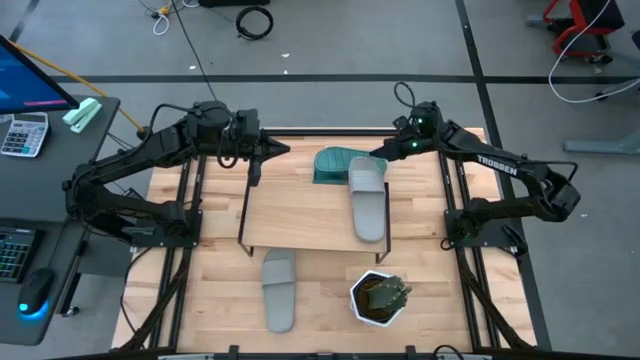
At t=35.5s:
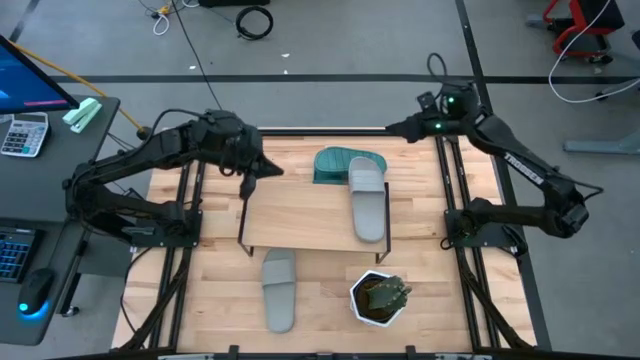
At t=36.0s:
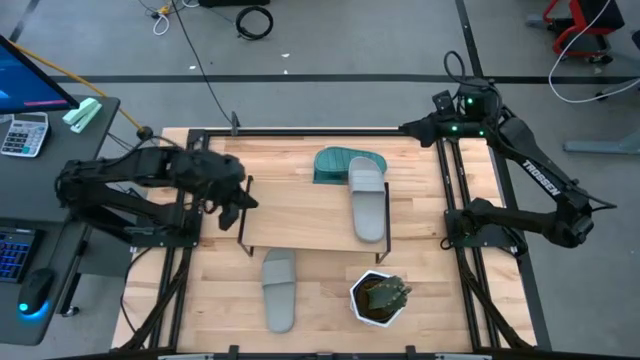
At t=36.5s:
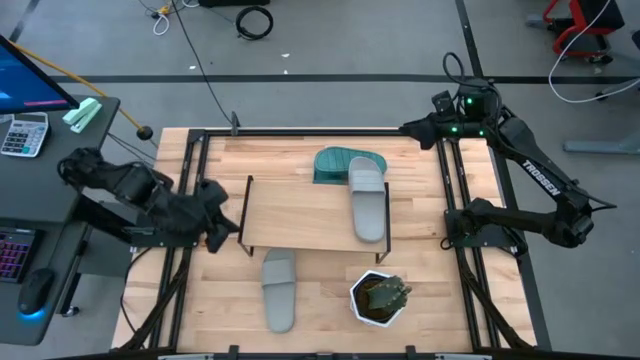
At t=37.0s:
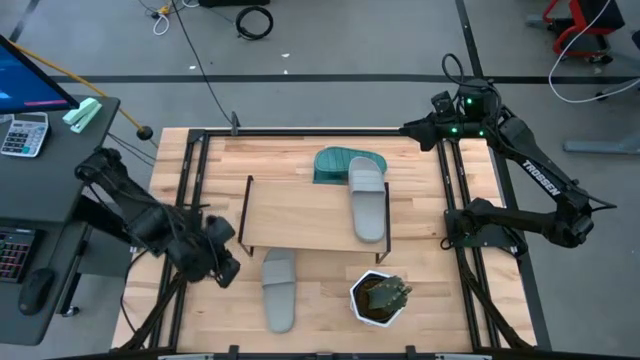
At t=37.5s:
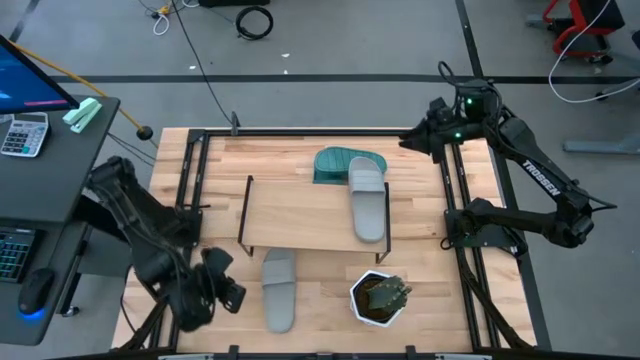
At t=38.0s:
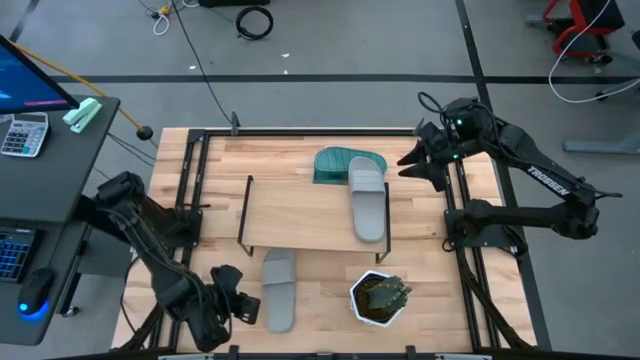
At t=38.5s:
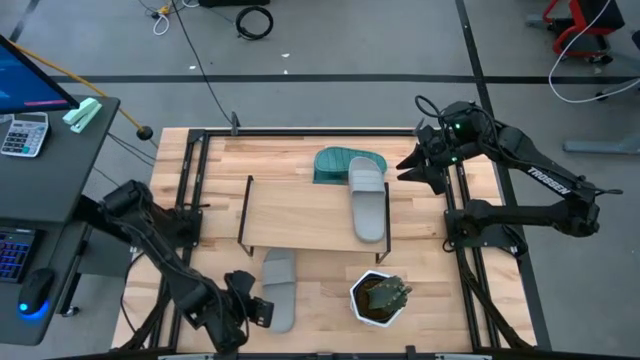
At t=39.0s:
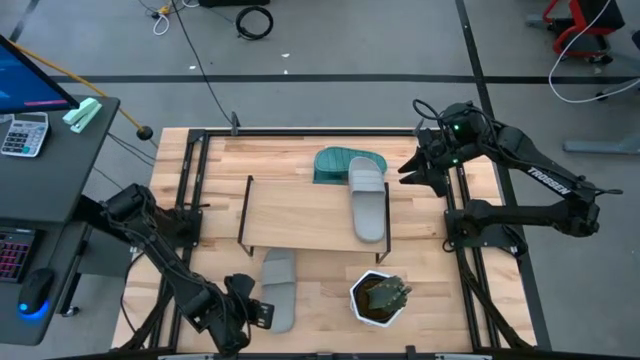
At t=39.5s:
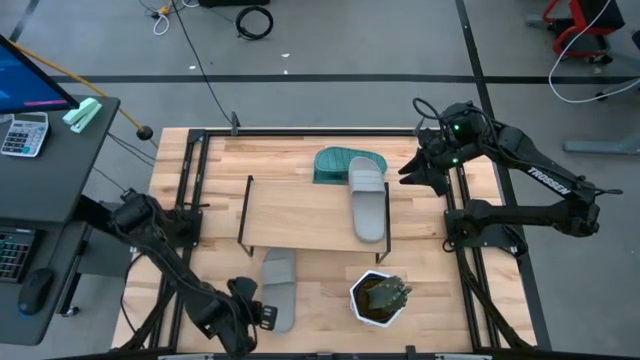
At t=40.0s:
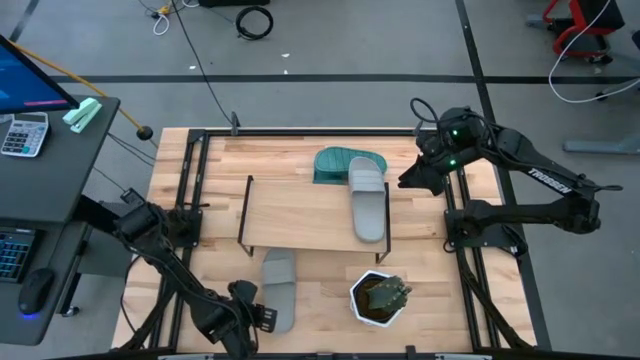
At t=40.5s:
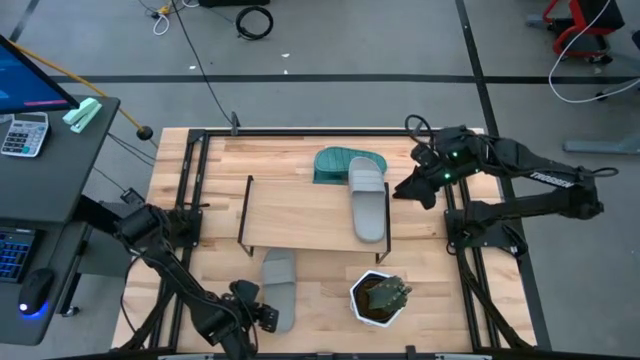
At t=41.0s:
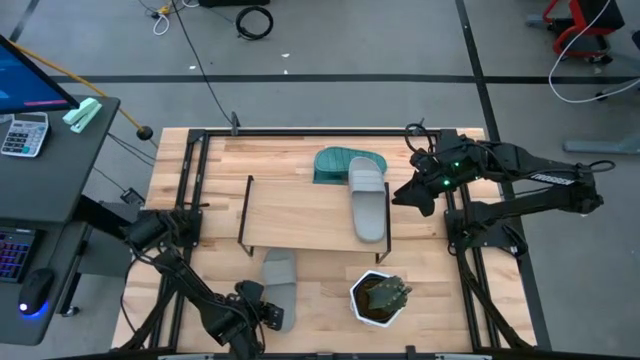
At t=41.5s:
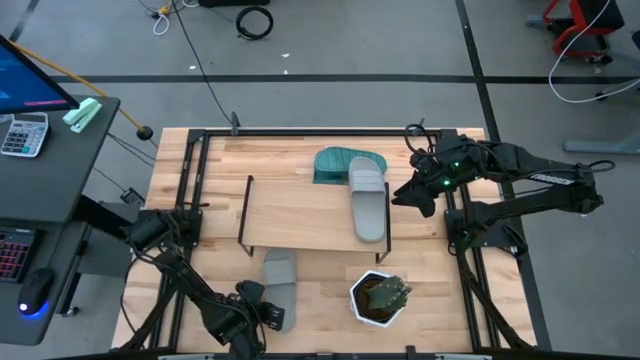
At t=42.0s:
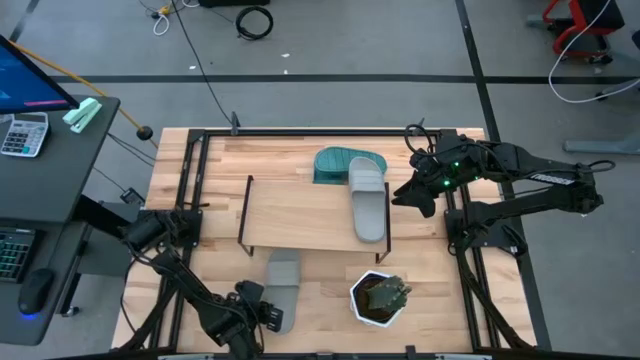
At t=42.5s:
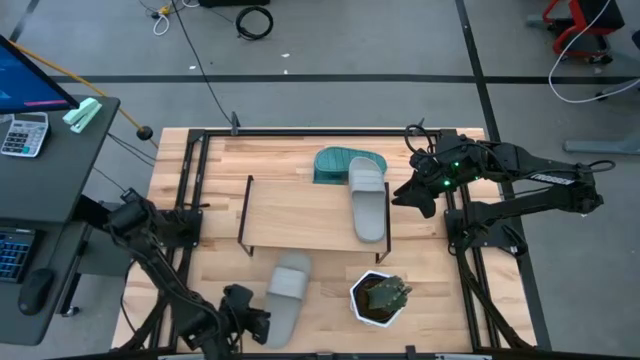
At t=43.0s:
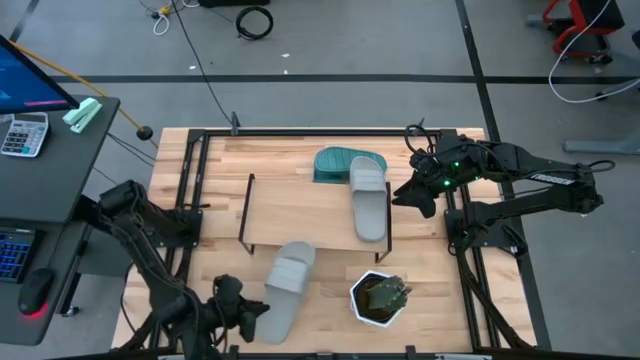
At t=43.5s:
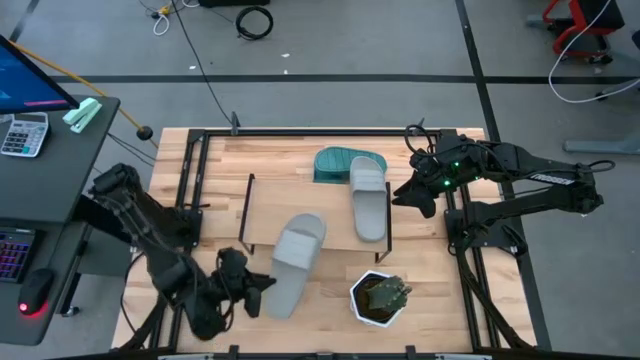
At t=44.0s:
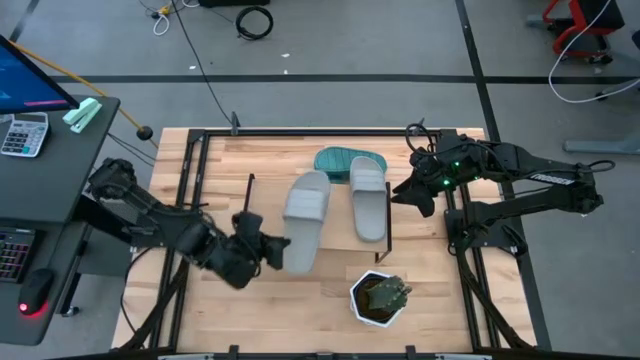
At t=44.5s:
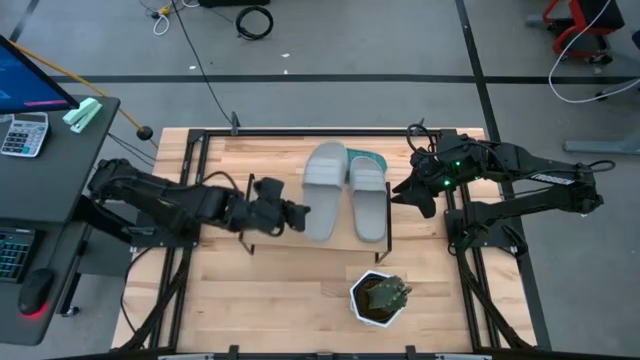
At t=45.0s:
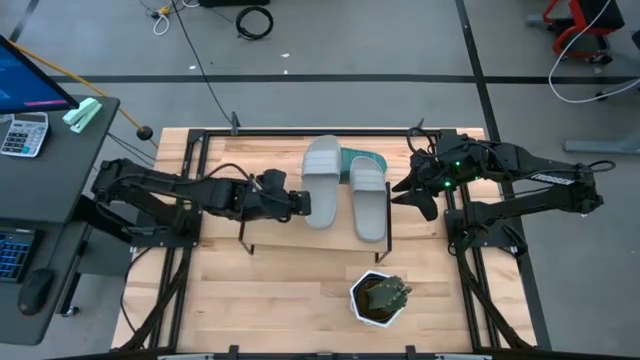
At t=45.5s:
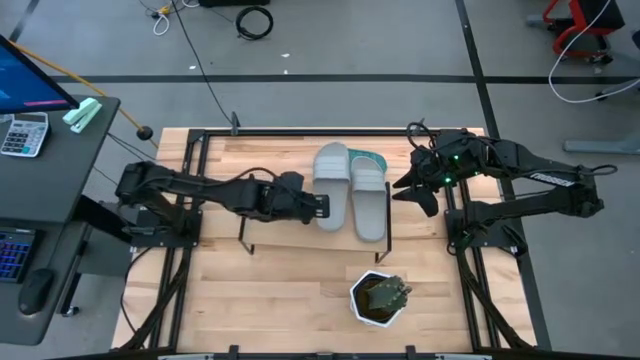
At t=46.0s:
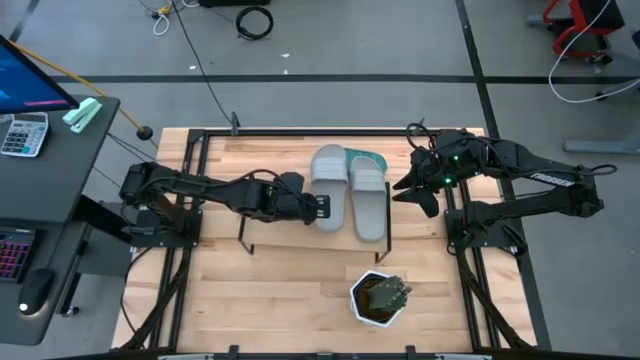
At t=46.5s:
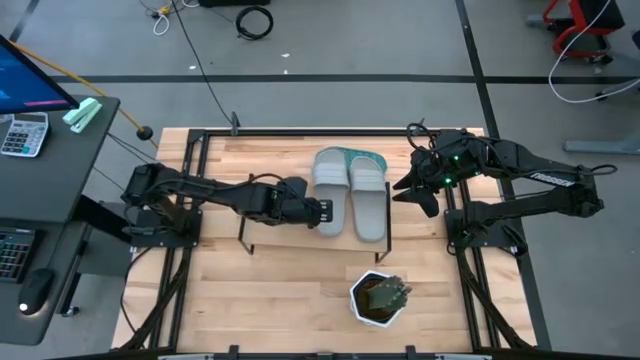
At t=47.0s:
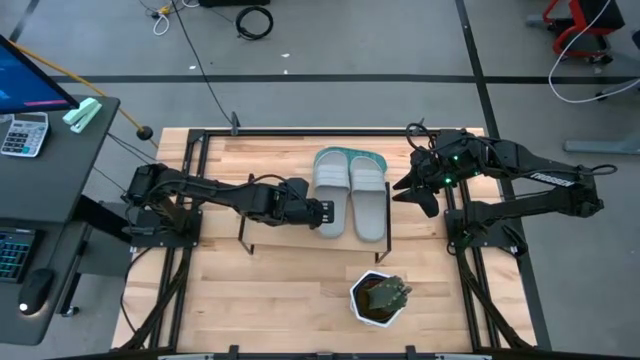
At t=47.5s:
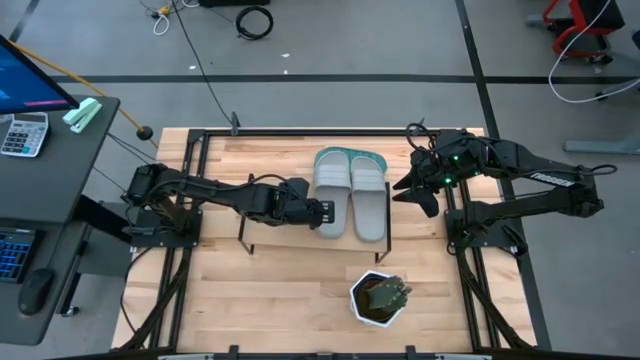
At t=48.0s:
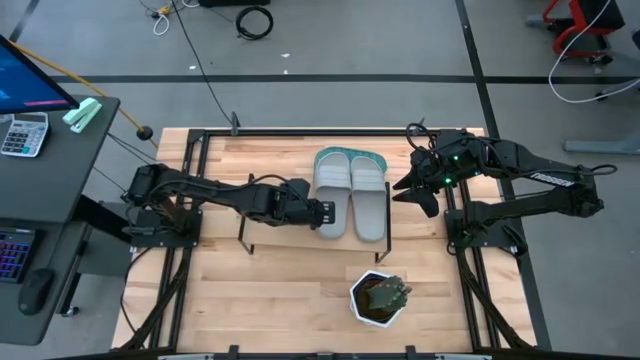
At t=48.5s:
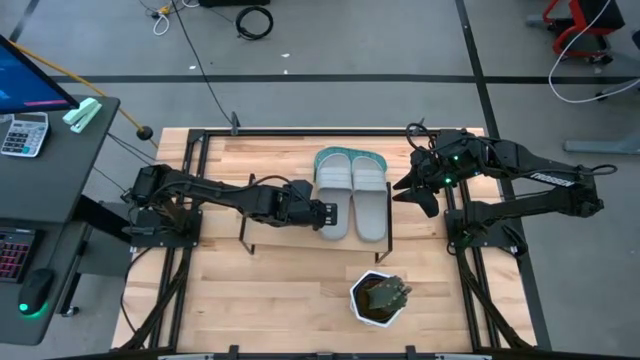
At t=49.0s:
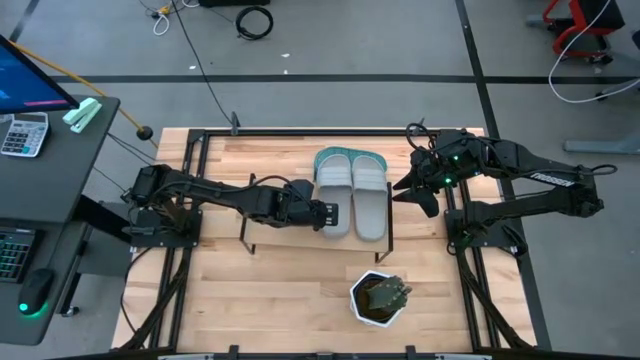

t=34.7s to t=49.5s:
Task: Pick and place slides into the shelf
Put the gray slipper on the shelf

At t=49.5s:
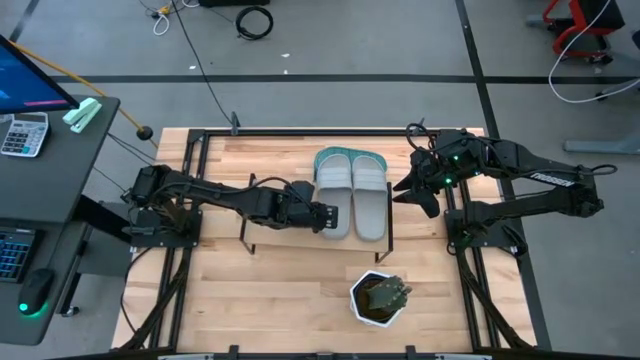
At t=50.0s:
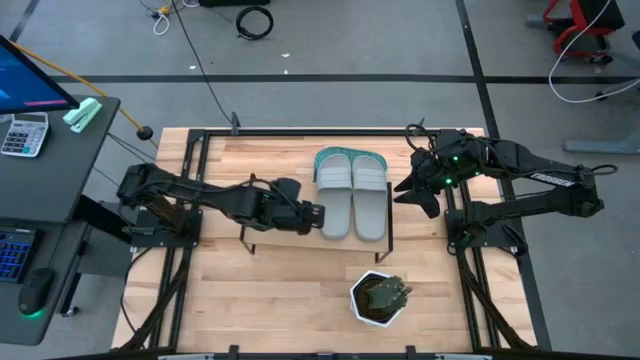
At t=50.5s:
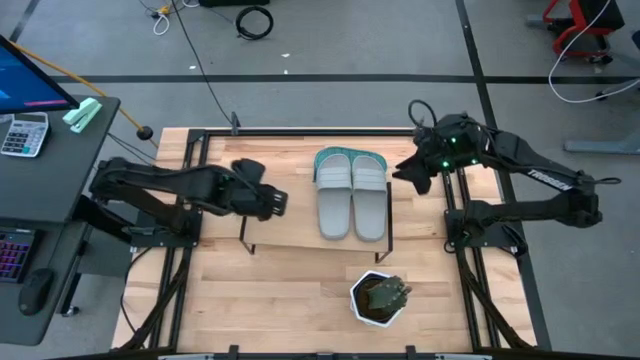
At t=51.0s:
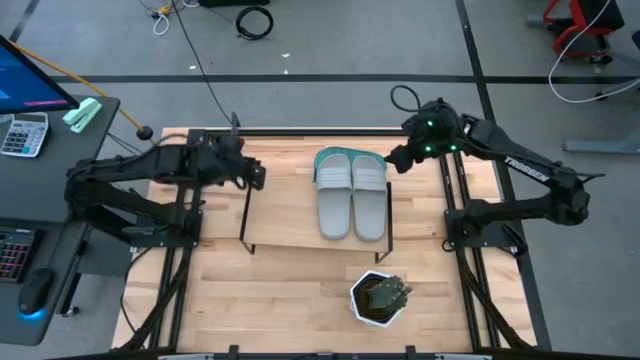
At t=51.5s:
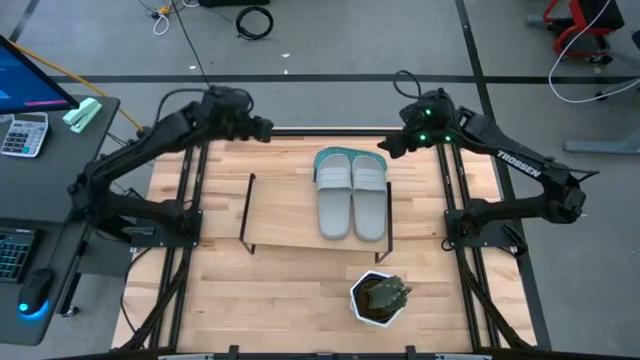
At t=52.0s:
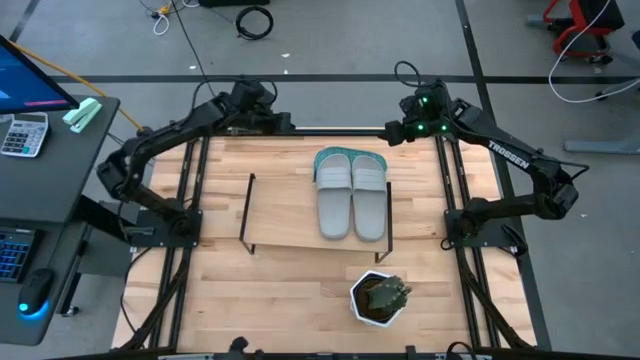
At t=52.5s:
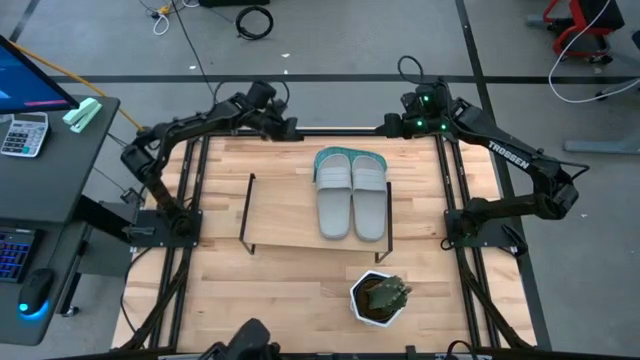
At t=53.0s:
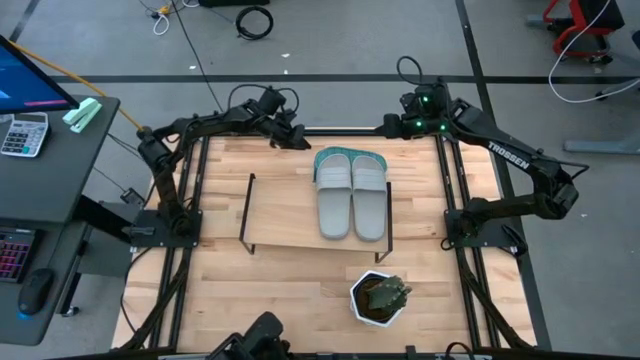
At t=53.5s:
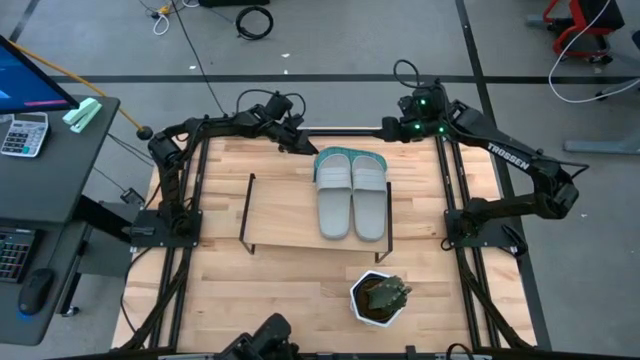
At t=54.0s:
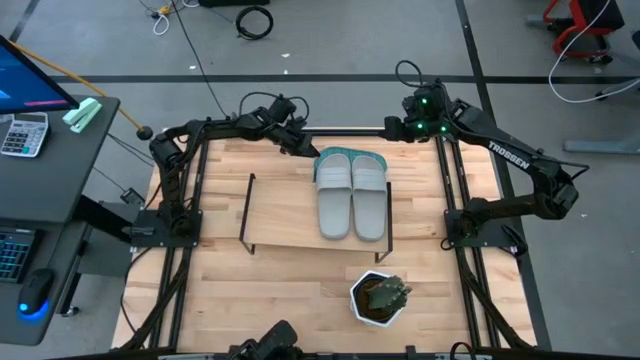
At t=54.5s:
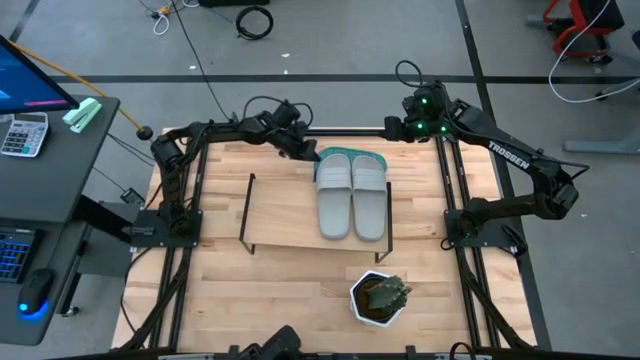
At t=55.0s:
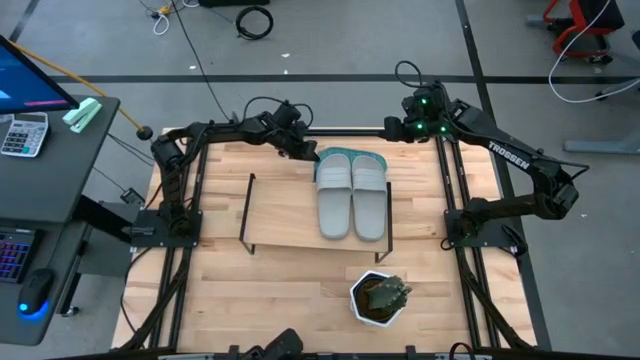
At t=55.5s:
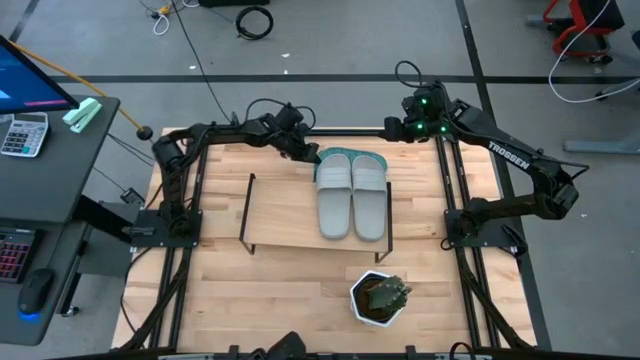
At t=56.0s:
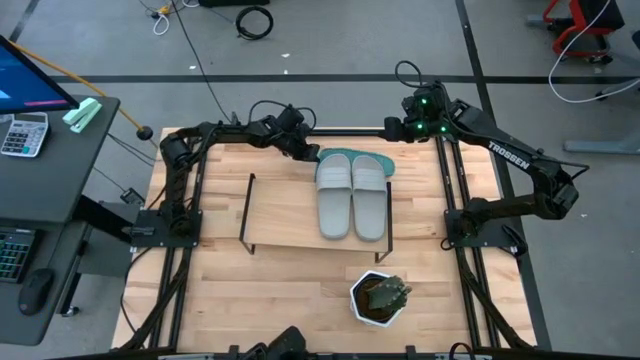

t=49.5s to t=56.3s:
Put the right green slipper on the shelf

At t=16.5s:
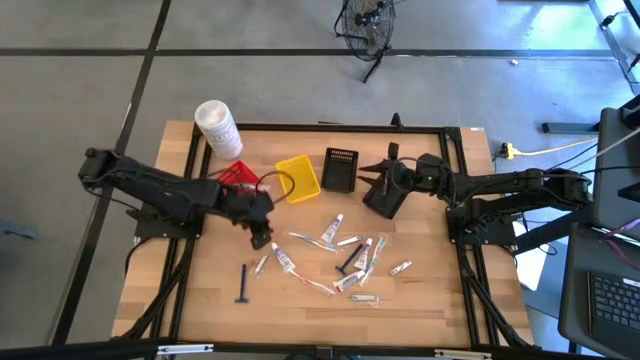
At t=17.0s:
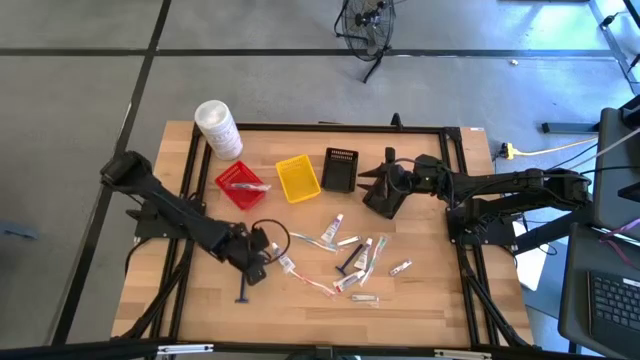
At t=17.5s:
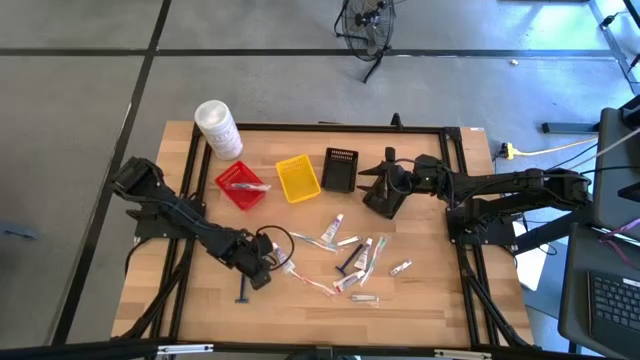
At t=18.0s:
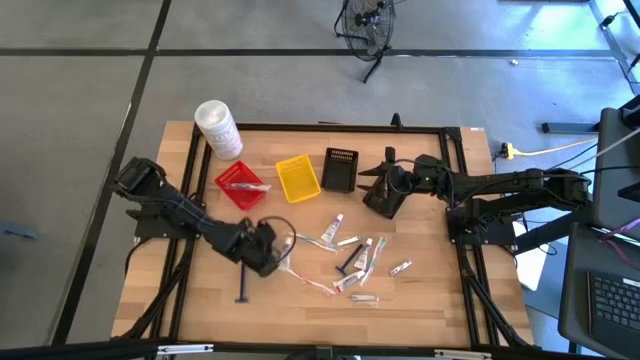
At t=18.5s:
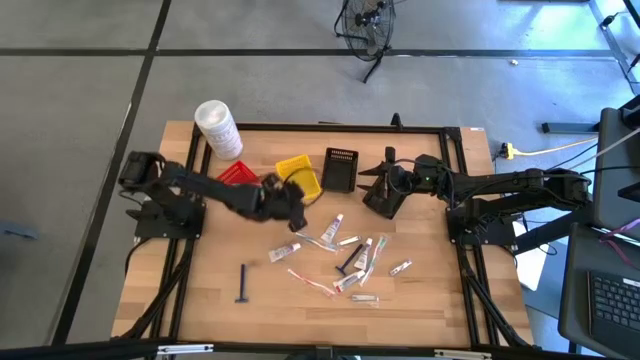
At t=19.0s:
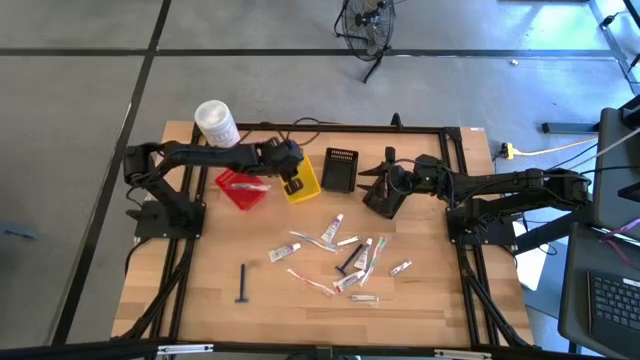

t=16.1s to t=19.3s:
Task: Pick & Place Travel size toiletries
Put the nail cutter into the yellow bin
